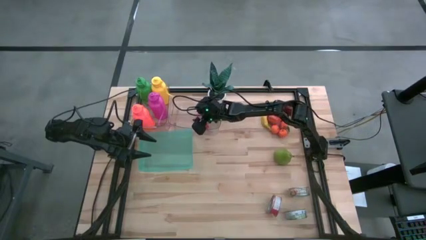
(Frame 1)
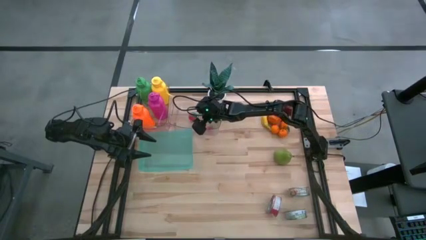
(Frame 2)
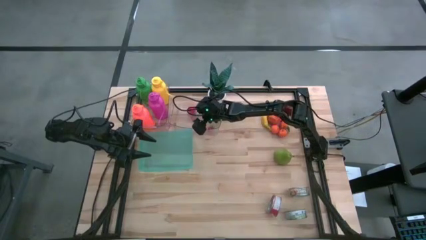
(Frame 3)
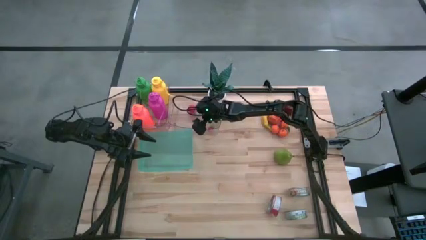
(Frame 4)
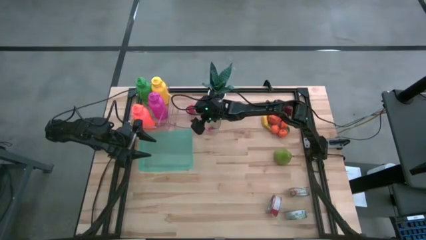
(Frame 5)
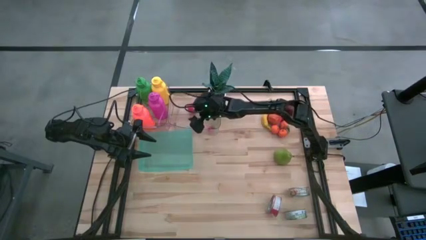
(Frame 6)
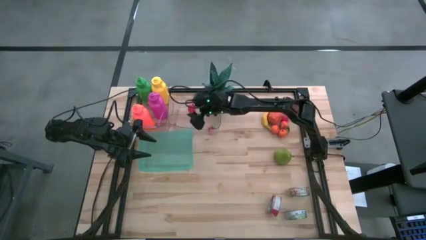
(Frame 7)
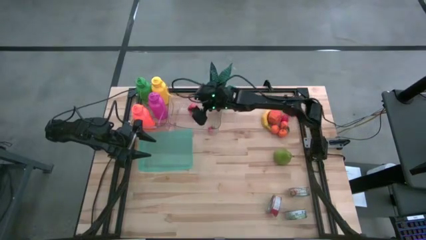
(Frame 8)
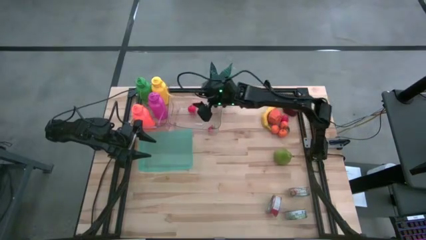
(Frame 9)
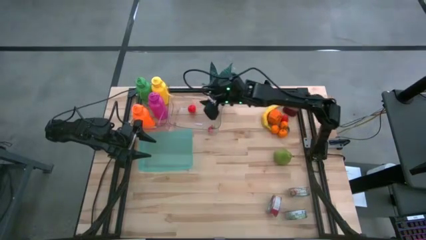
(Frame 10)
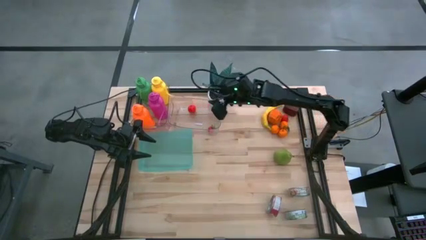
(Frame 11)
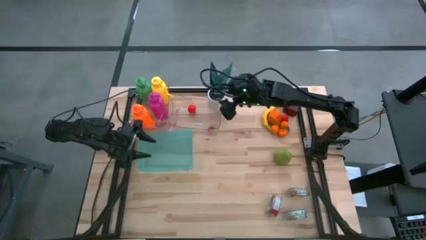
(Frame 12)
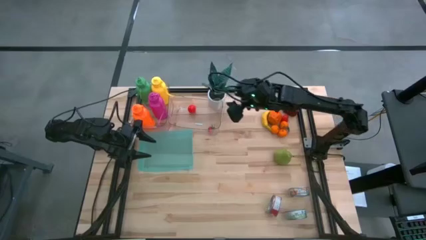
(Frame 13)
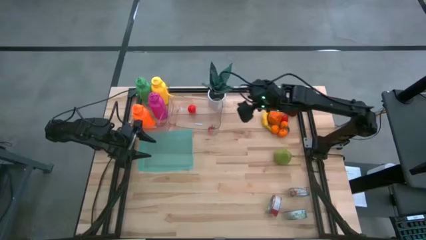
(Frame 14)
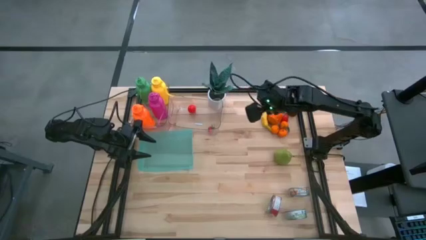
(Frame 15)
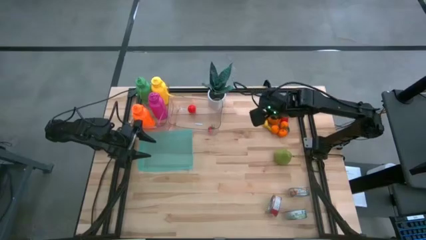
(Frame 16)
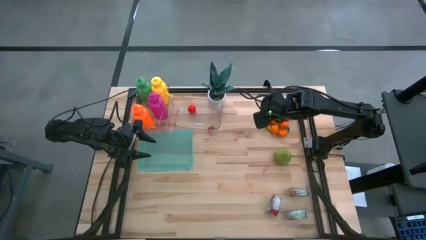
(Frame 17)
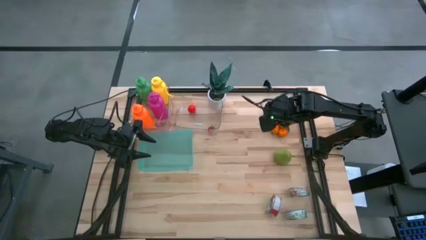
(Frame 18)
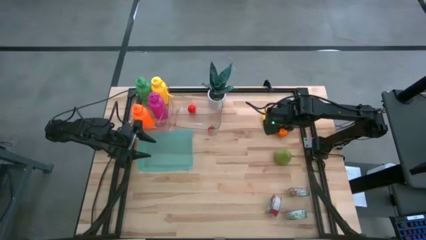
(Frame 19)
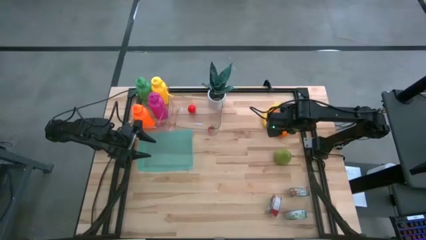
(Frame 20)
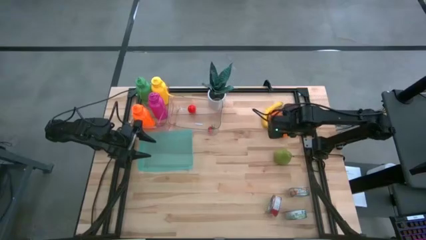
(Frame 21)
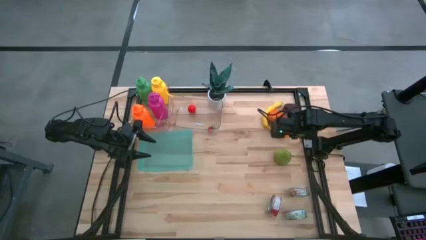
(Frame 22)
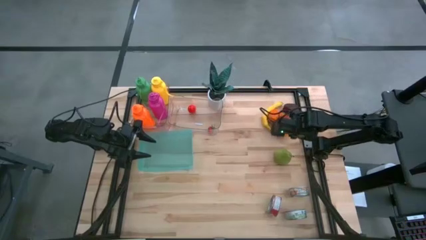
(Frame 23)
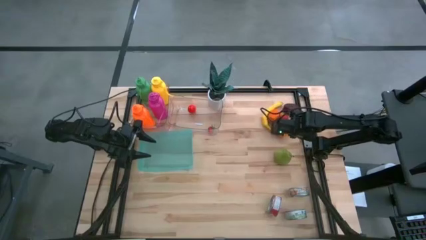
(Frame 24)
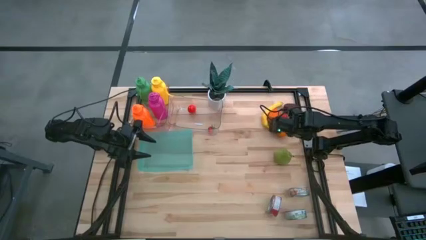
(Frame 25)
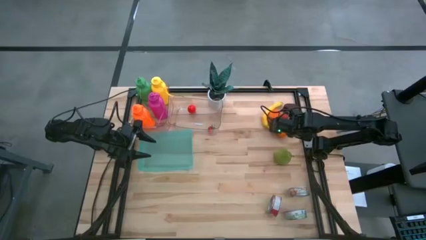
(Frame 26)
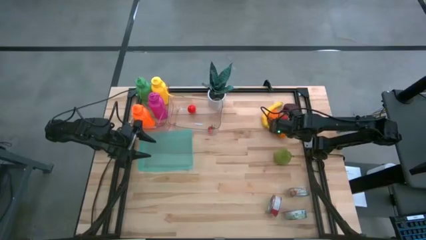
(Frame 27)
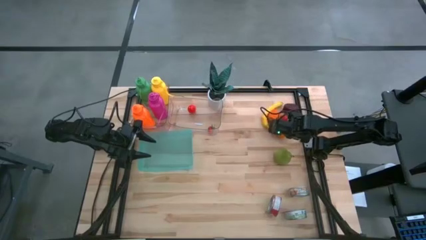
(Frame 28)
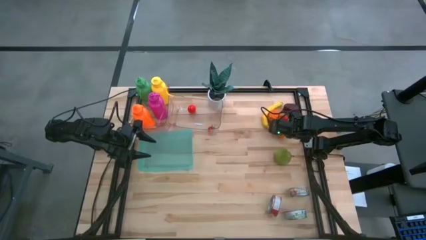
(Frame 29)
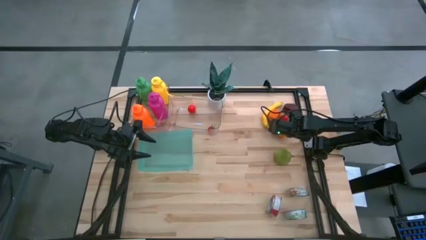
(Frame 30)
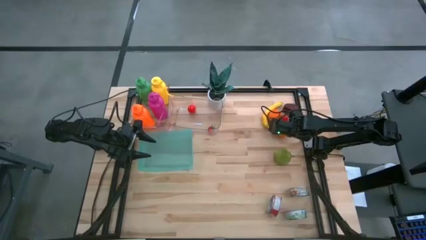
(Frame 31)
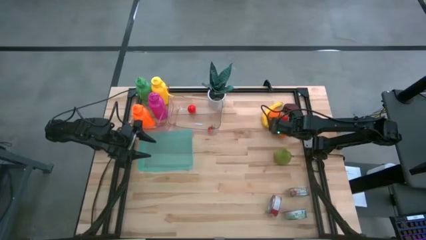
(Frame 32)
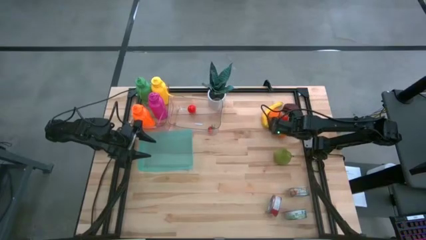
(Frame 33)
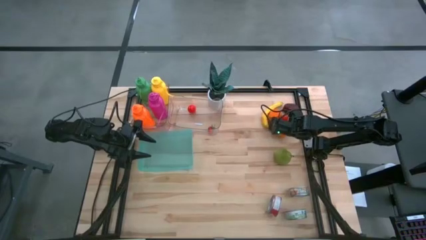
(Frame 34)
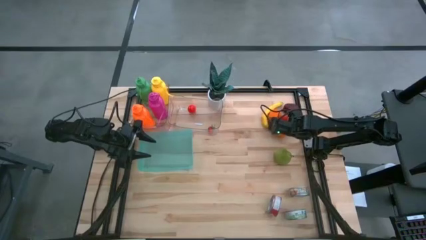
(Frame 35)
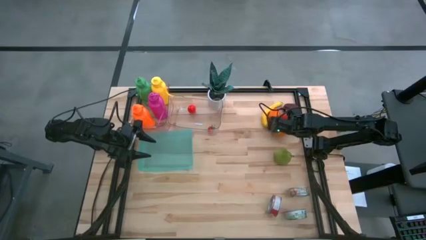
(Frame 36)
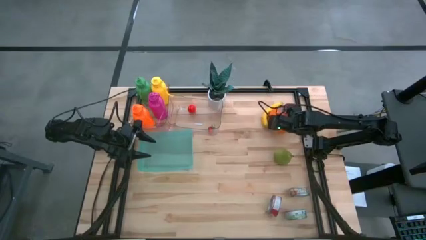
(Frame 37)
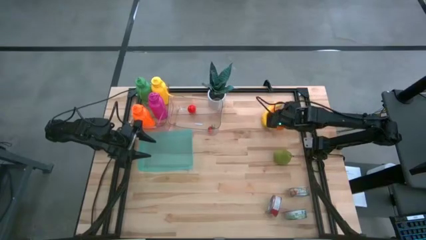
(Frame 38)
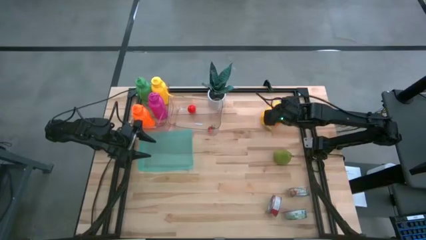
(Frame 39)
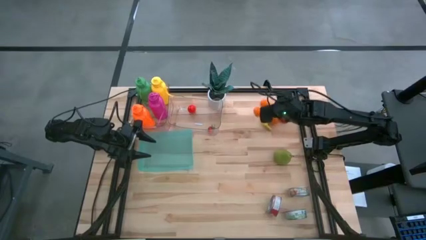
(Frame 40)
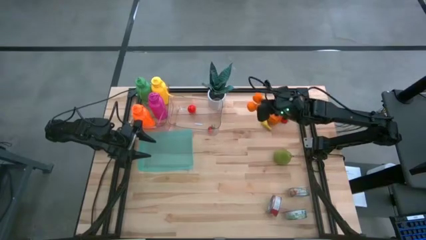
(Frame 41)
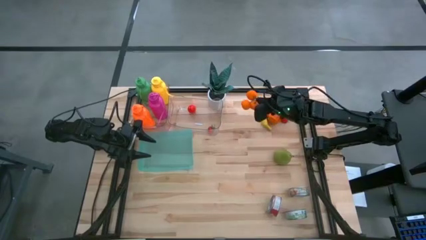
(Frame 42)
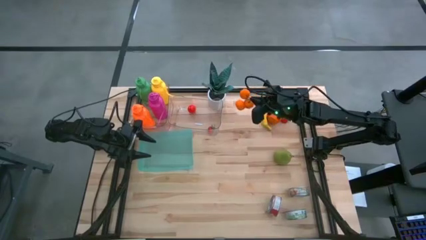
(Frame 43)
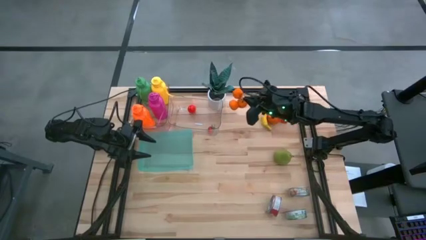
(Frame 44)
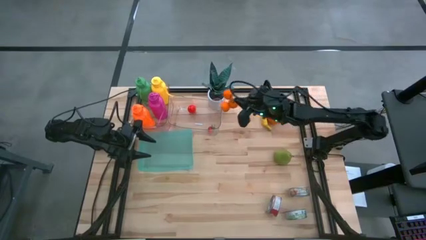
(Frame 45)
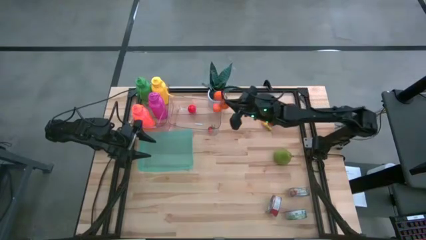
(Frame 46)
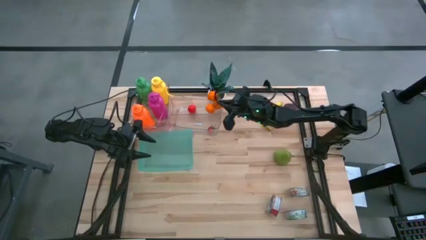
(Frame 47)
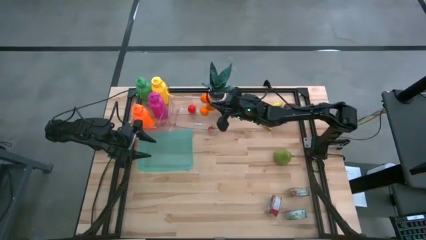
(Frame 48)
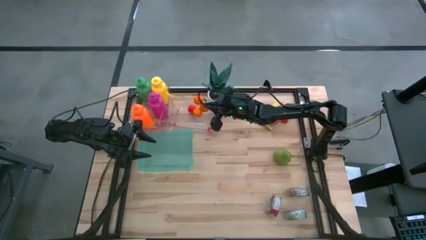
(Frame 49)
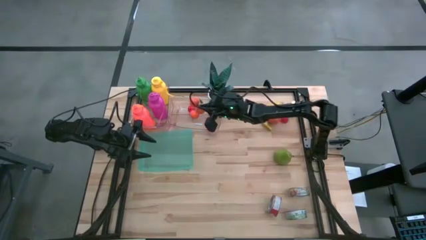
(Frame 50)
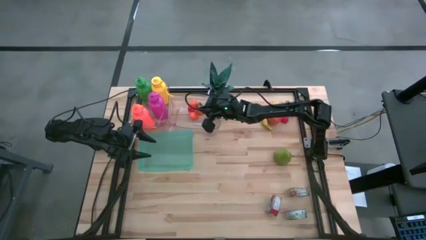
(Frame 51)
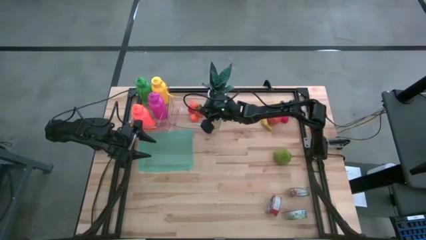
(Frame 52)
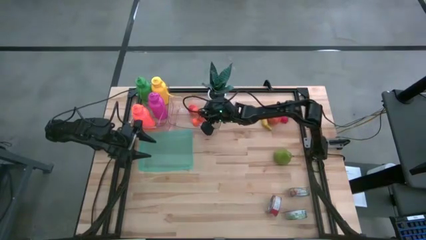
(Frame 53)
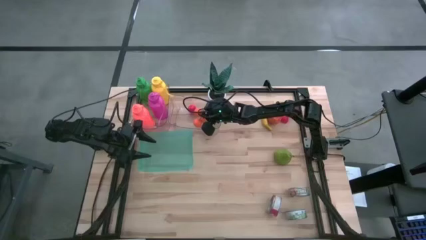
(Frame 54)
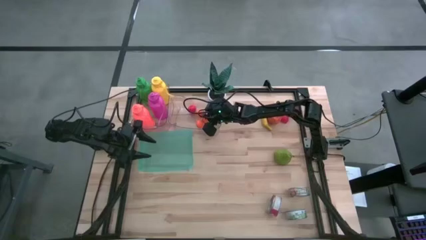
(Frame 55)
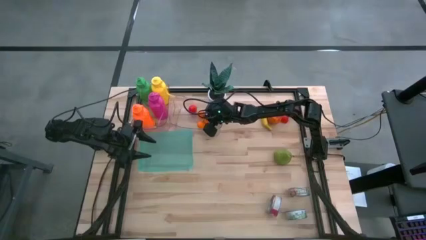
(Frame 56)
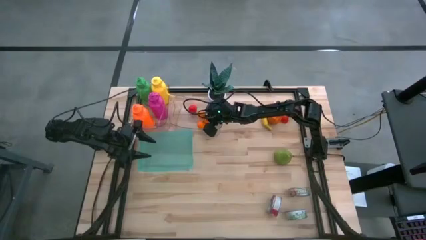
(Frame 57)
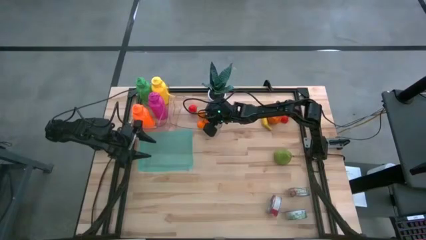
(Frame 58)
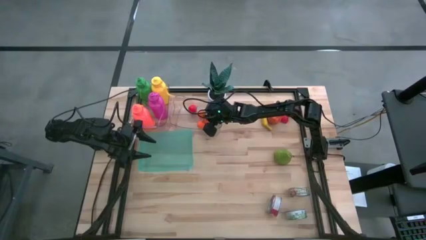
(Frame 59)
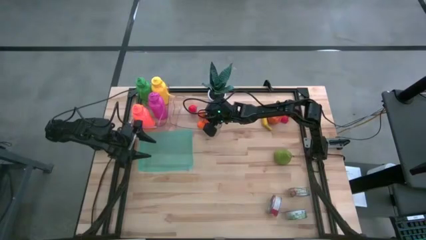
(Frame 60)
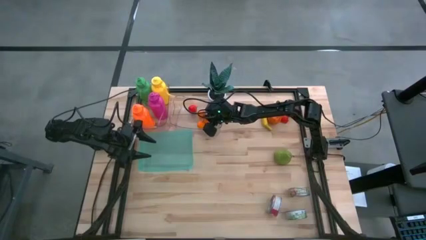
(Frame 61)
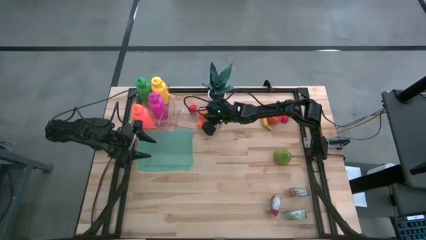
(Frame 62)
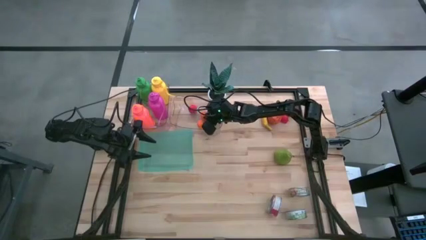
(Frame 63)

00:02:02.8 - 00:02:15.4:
Task: Pick & Place Food Item
Put the orange tangerine into the right transparent bin

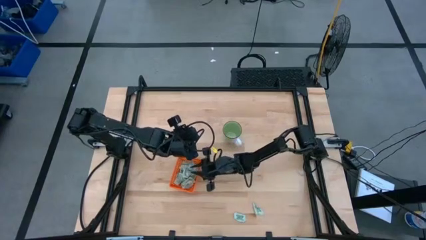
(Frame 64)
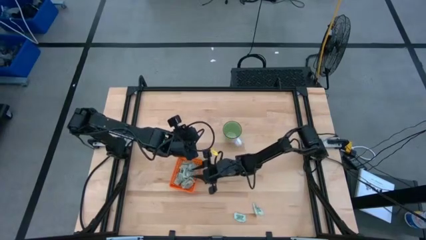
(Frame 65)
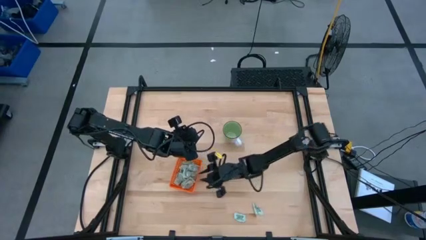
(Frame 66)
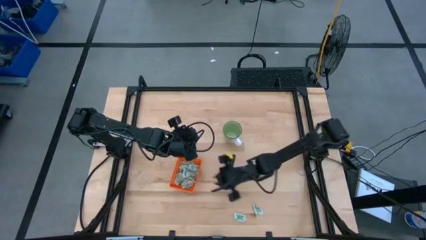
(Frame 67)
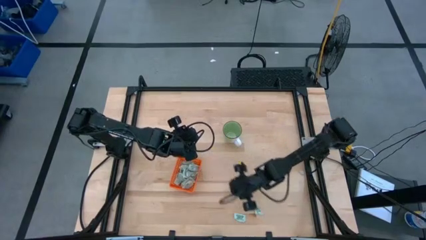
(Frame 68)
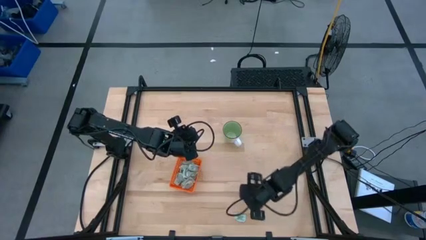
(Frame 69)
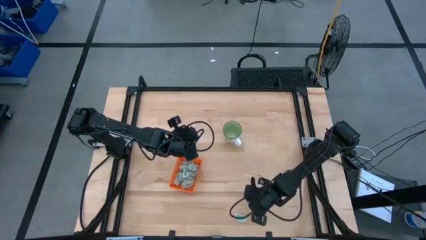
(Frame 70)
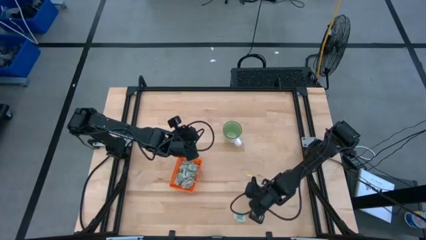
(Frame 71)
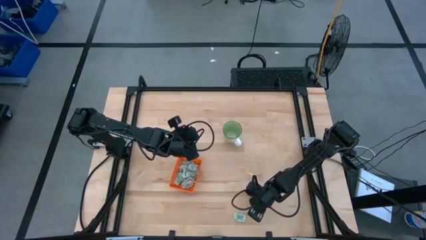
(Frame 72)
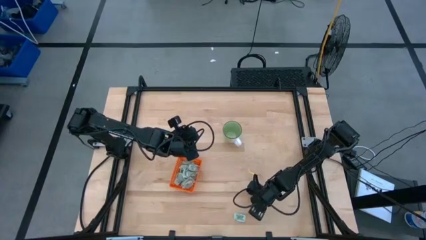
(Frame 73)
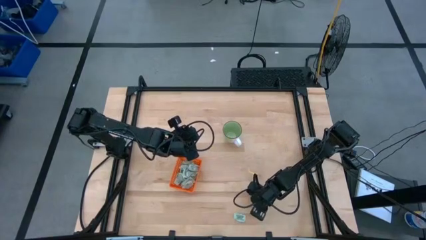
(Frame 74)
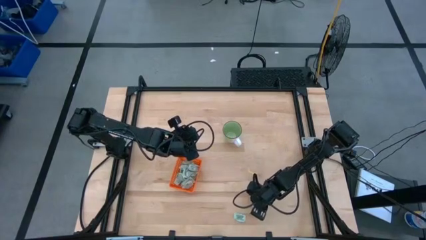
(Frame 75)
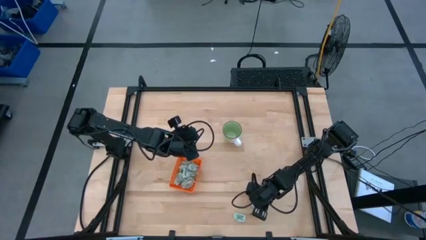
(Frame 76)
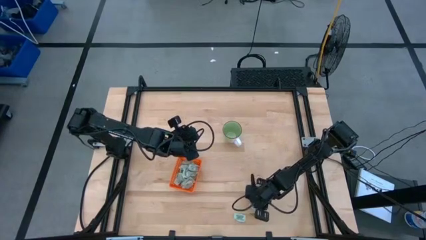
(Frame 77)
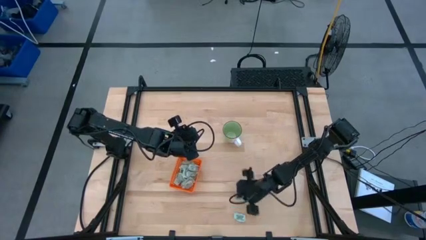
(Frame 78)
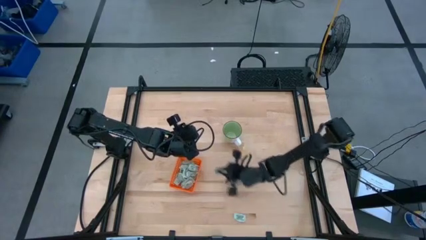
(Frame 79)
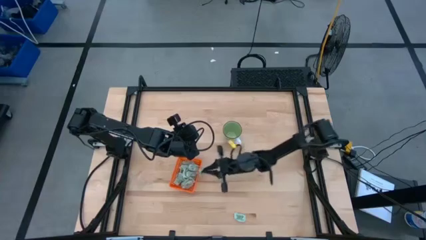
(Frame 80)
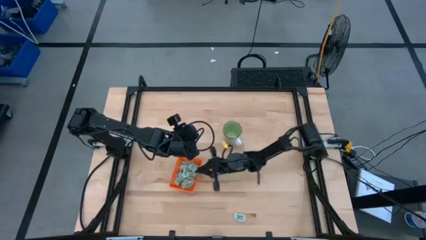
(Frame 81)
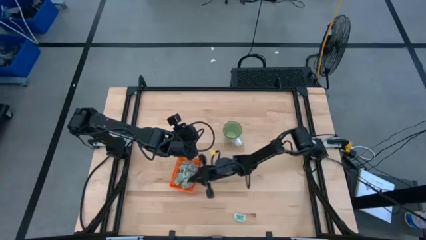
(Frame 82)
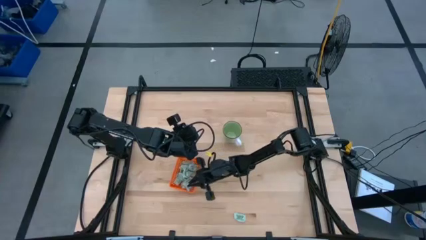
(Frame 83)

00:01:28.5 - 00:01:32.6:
Task: Pick and place Stevia / Truvia into bins
Put the light green stevia packet into the orange basket
